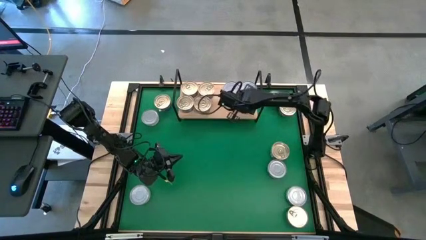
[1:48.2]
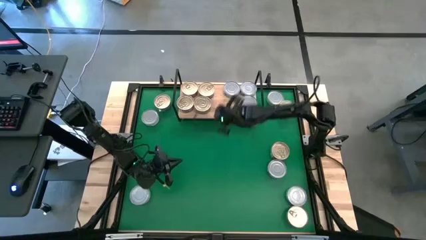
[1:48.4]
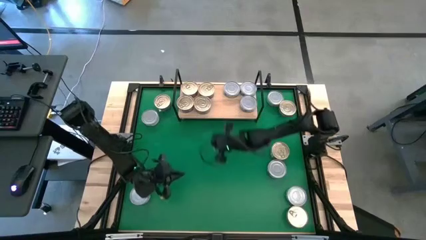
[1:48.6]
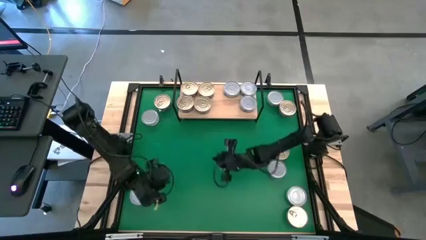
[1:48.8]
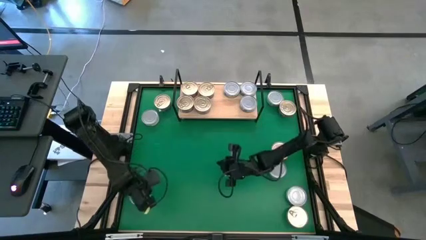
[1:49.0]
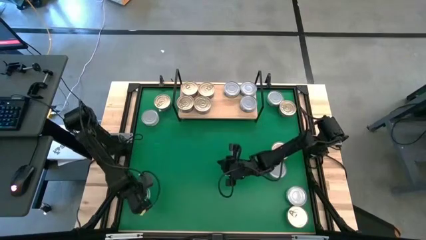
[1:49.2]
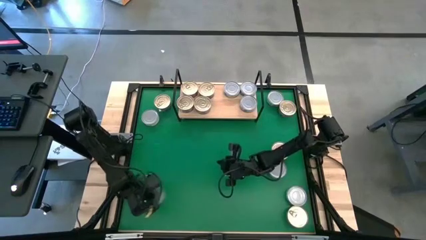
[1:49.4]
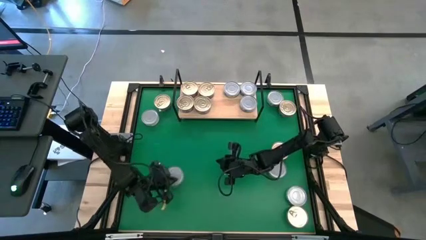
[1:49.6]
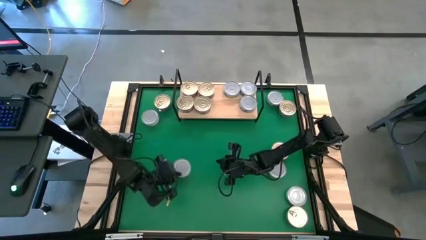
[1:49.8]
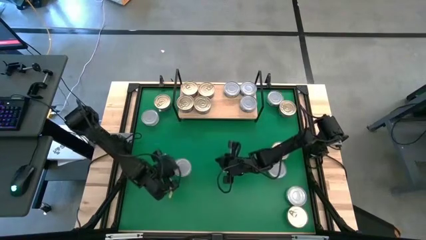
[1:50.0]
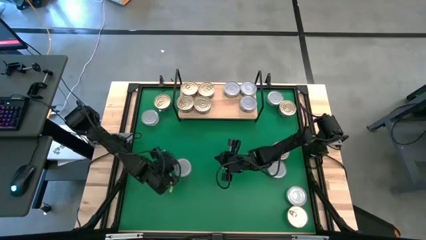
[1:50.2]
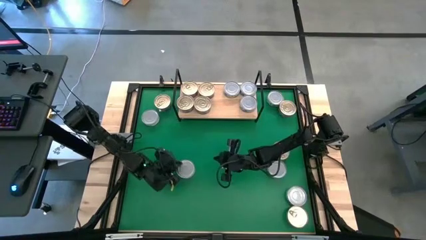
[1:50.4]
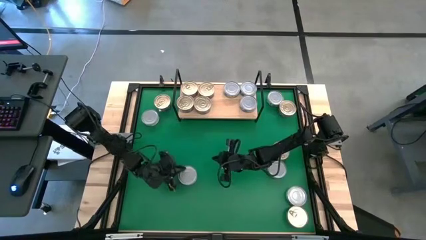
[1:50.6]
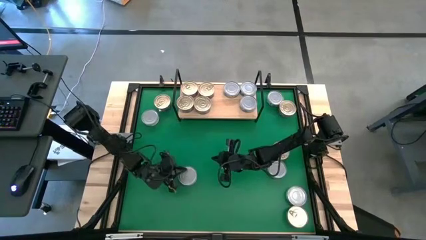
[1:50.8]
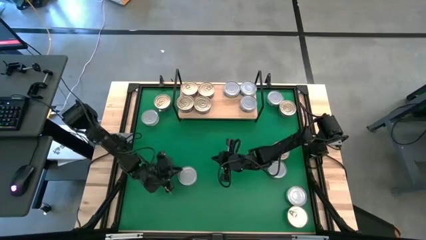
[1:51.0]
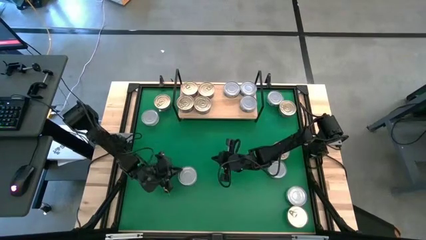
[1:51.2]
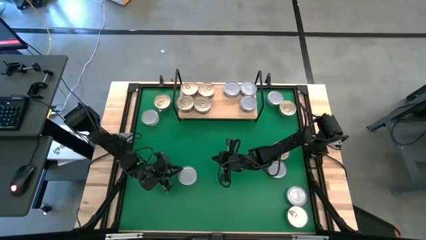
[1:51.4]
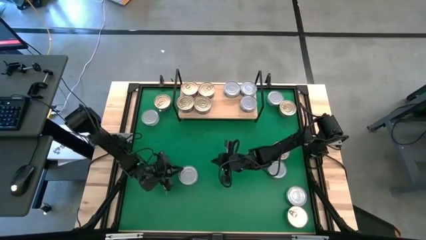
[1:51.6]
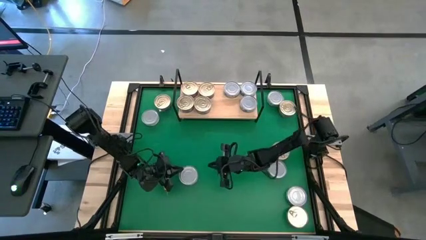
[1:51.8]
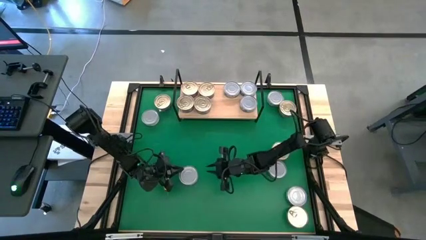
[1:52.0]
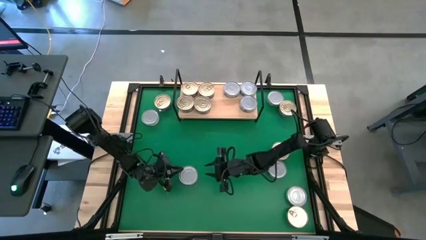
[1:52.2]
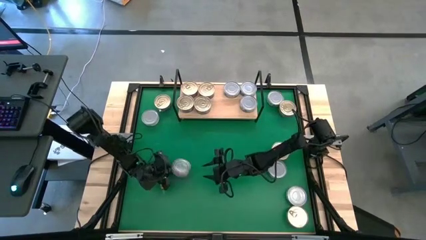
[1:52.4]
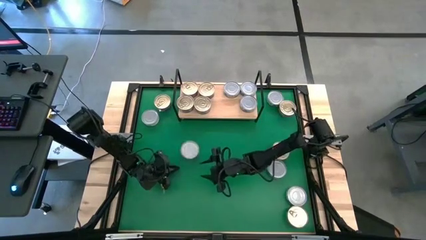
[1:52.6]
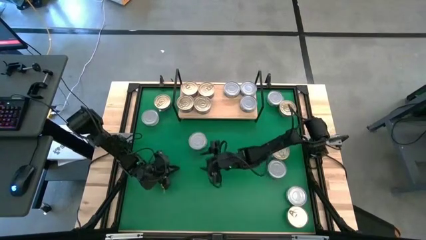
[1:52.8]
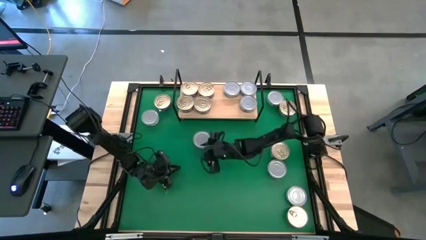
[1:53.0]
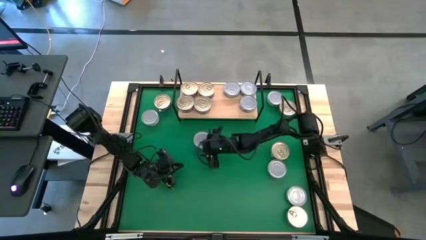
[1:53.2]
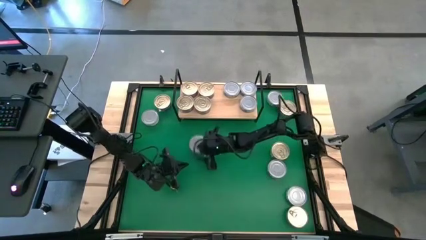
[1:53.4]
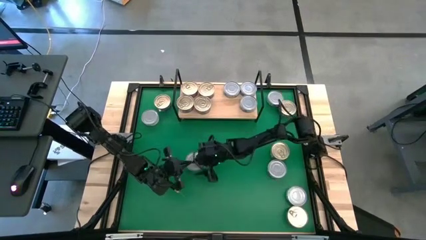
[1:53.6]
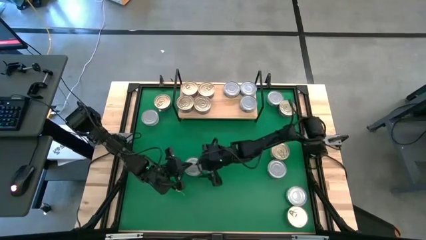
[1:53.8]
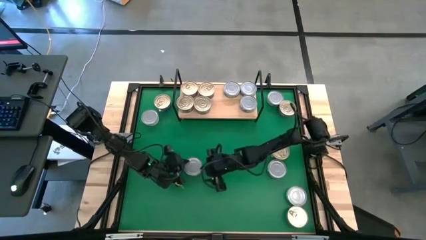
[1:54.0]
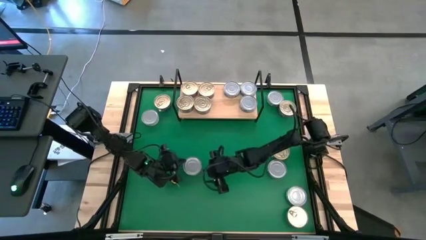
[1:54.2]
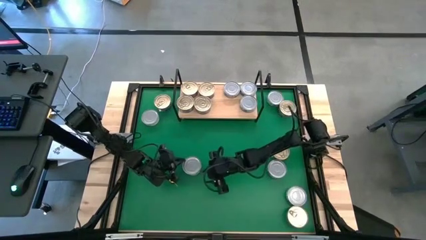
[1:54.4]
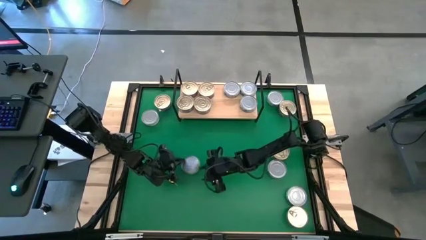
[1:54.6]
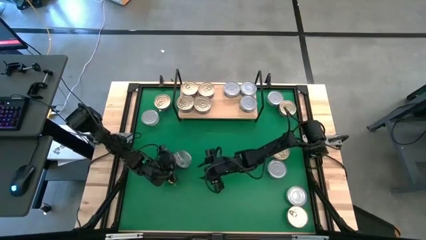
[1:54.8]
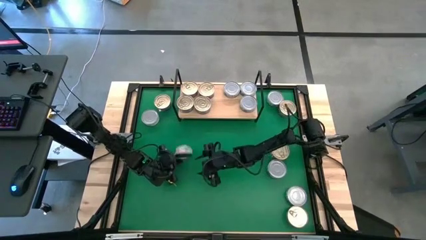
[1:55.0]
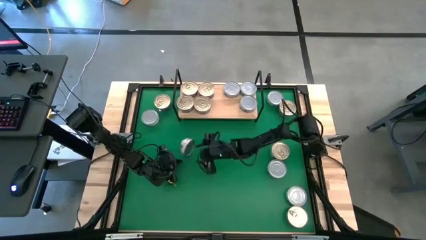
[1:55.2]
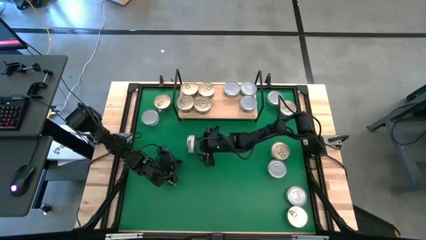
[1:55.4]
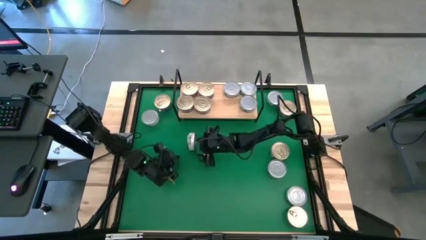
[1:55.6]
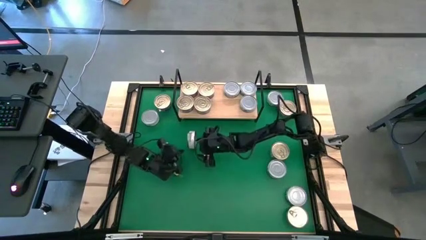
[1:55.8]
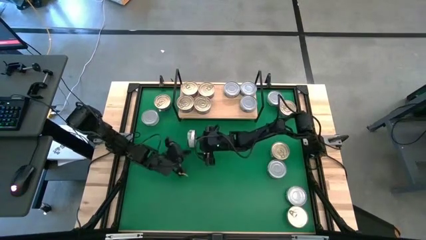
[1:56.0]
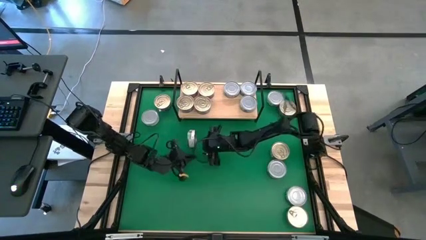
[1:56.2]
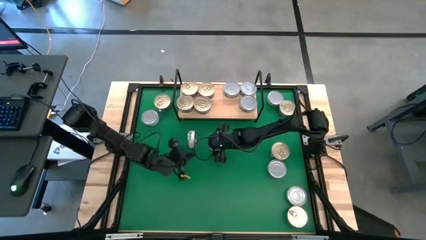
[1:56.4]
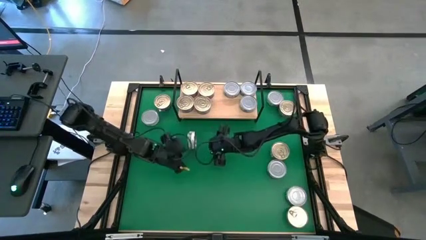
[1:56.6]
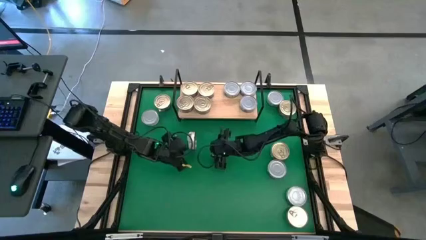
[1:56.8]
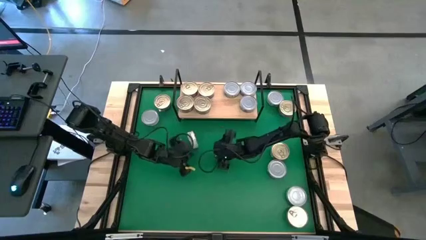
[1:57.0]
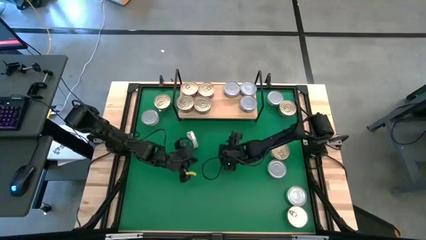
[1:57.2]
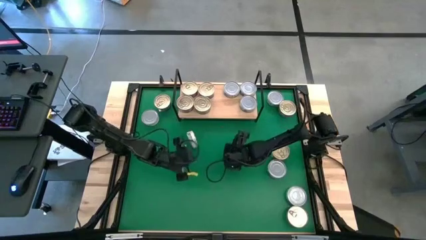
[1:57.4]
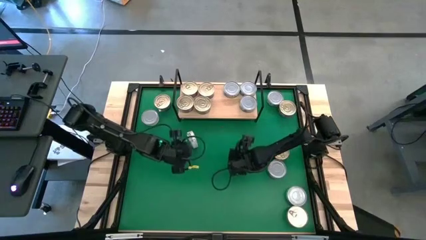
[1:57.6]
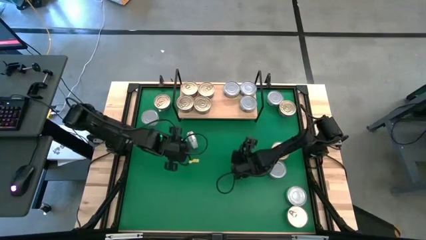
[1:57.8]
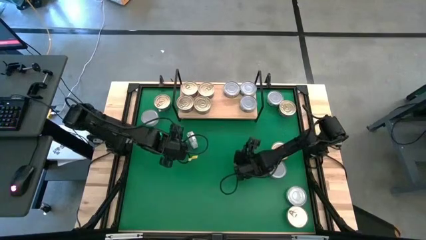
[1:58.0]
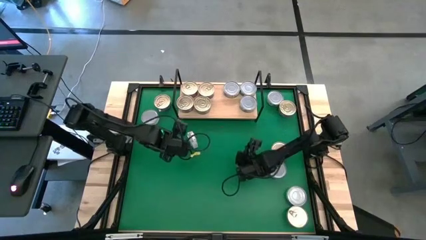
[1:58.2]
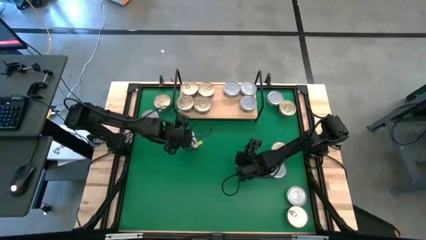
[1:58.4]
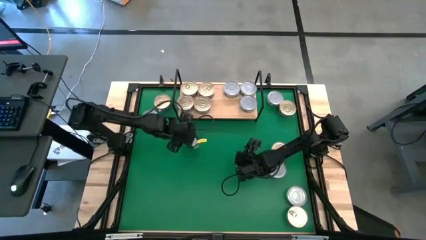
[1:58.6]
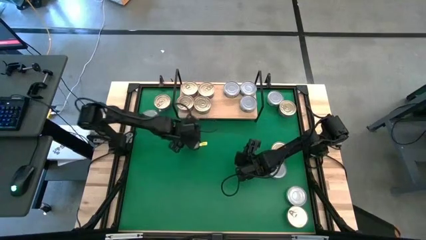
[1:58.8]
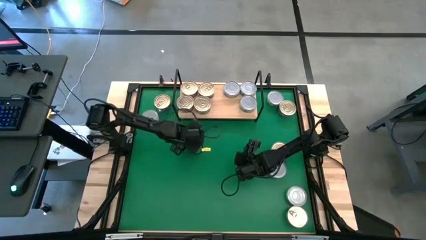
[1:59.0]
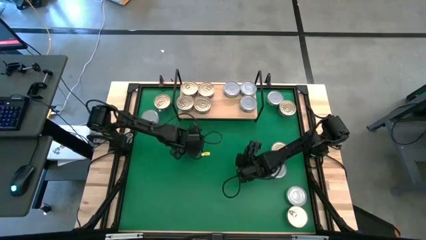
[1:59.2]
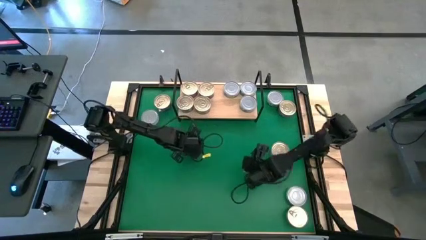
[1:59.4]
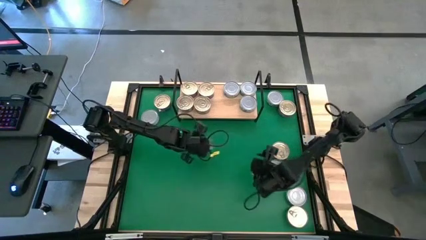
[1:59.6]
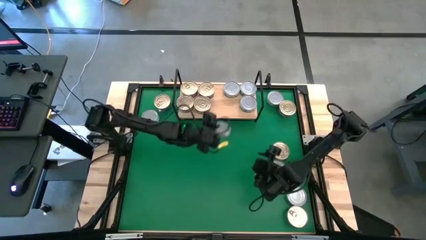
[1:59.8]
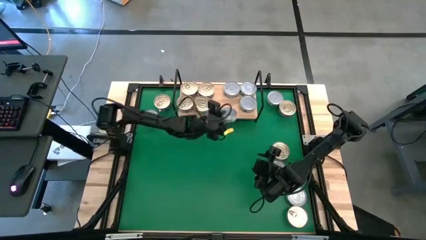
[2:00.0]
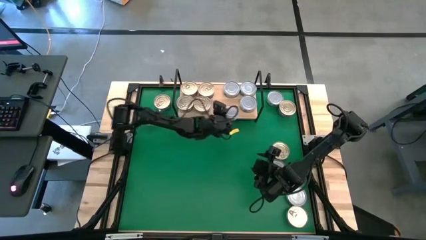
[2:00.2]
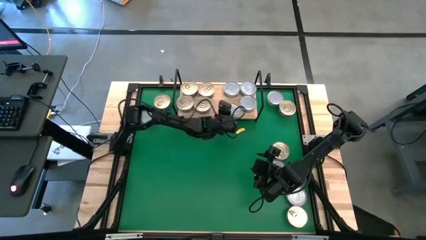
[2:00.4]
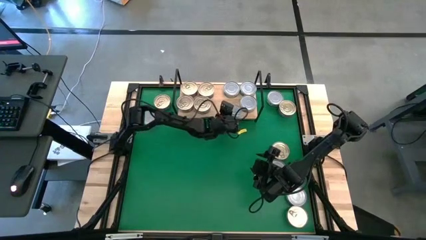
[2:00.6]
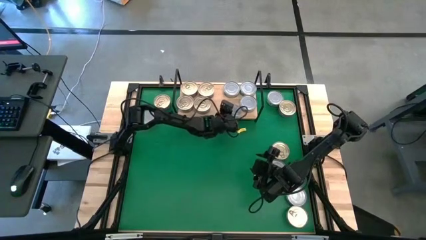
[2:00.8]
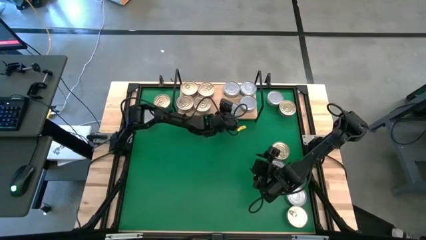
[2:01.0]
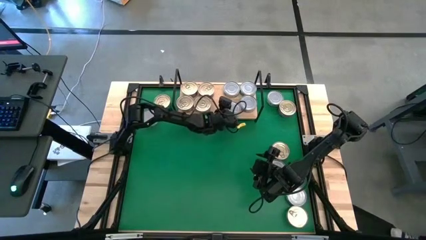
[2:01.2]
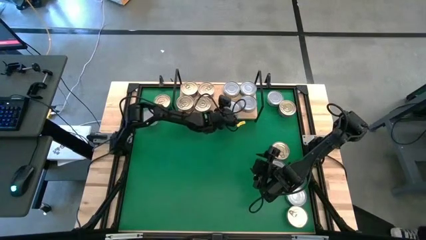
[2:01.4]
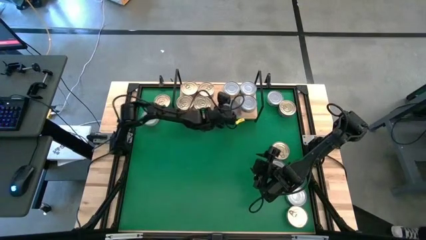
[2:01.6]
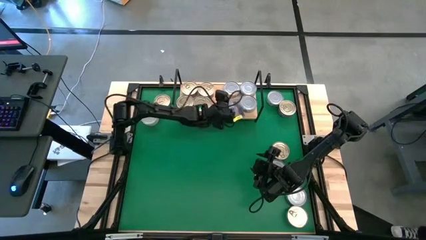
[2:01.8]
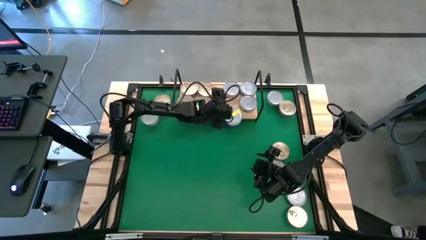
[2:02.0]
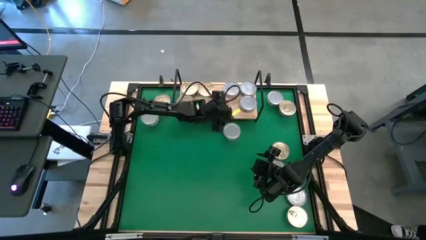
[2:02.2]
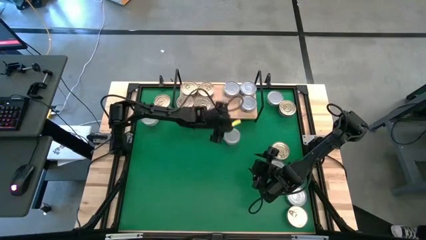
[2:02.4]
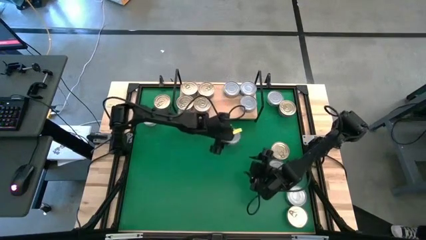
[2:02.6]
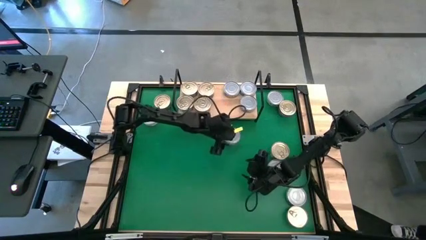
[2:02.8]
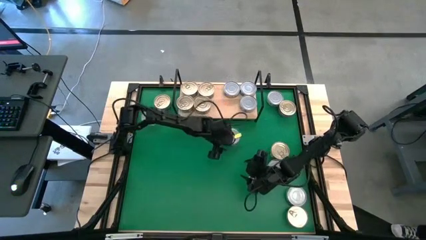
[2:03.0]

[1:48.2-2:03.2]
Task: Stack canned seafood by type on shelf
Put the green white tuna can on the shelf

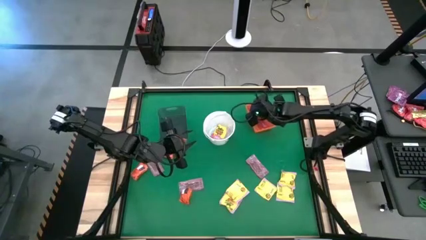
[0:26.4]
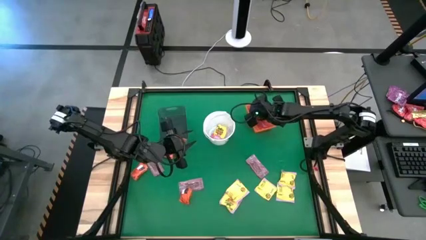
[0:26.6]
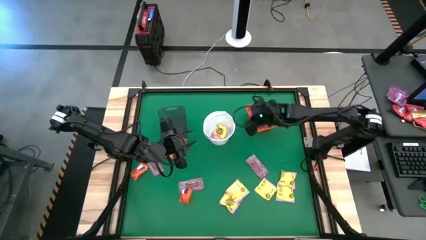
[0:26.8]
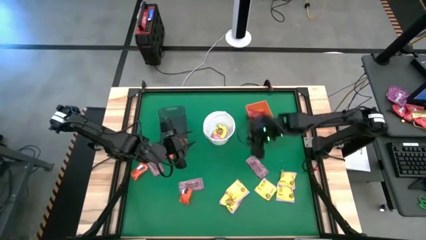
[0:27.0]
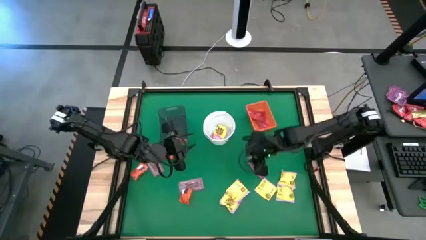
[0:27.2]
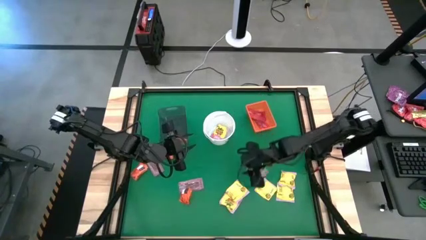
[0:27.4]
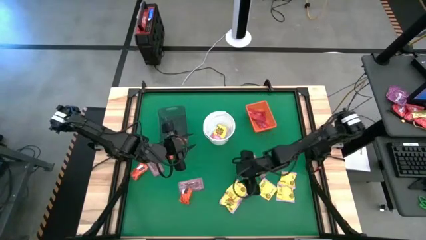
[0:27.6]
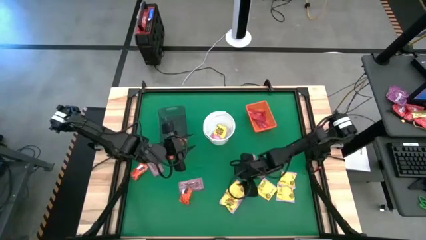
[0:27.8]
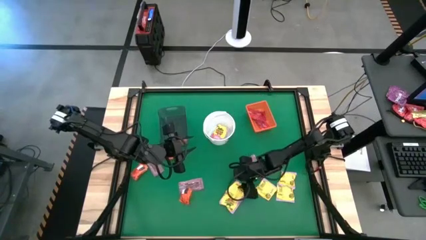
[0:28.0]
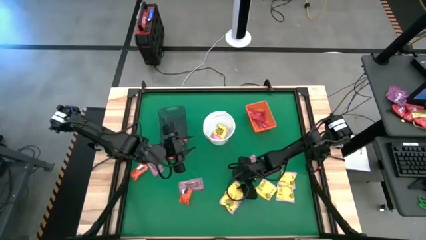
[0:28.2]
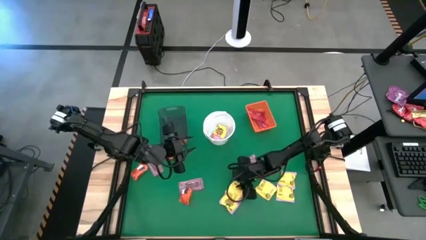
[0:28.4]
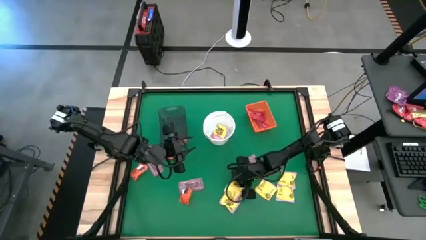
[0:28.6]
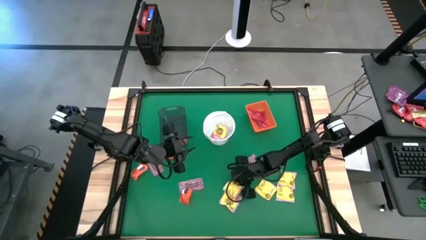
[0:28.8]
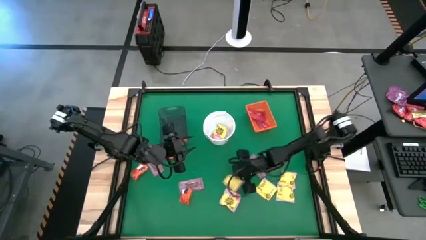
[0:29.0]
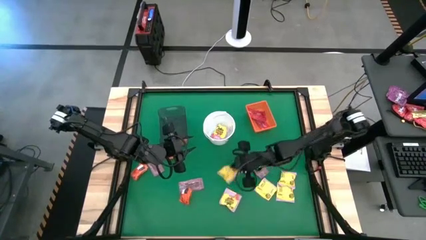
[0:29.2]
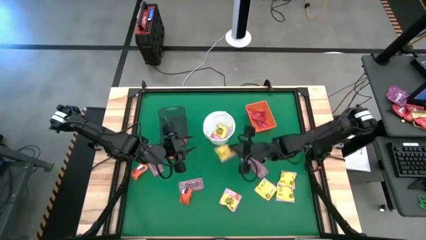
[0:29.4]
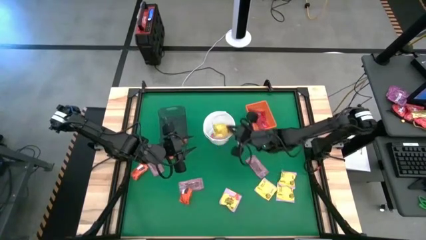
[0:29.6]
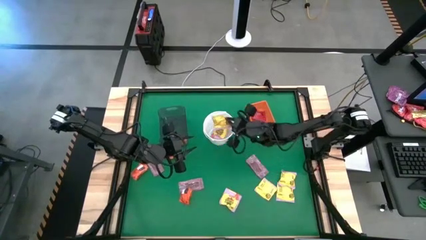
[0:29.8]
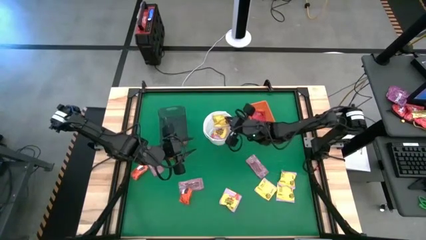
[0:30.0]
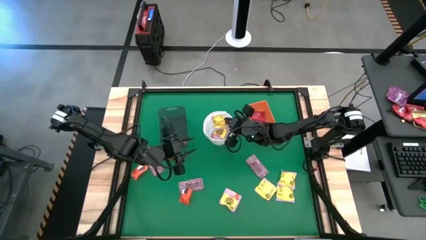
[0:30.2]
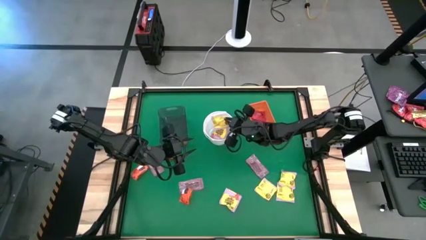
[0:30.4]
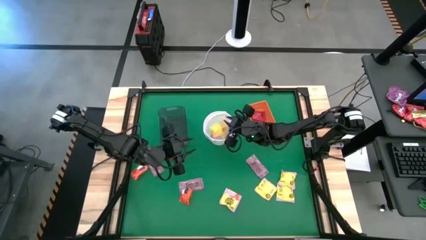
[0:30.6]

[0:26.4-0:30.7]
Task: Sort candy by brand, put in halloween buckets
Put the yellow candy into the white bucket
